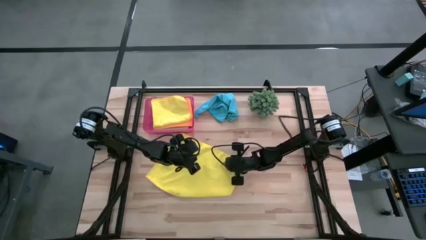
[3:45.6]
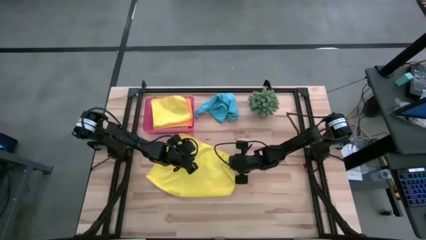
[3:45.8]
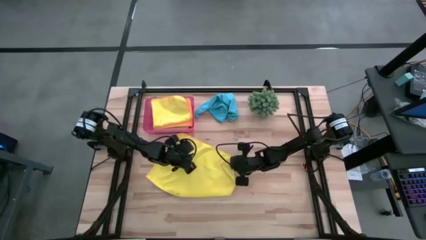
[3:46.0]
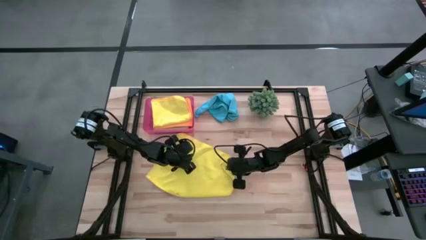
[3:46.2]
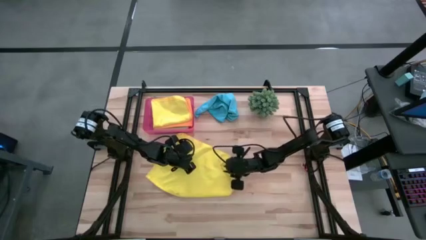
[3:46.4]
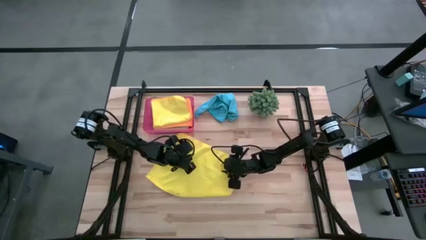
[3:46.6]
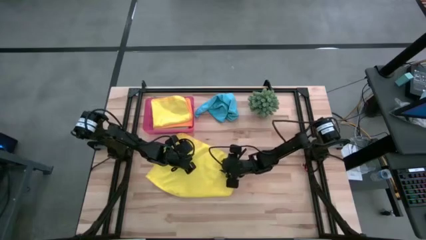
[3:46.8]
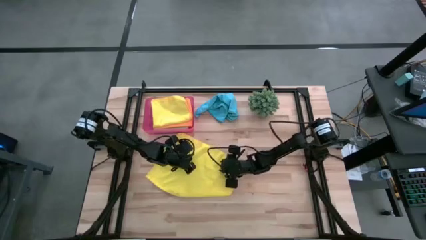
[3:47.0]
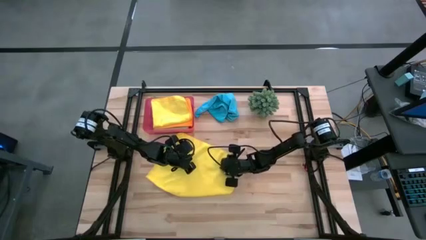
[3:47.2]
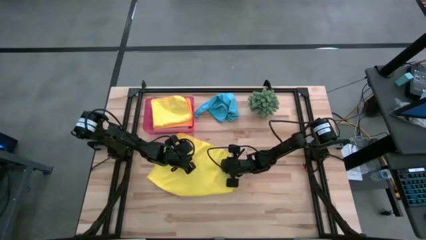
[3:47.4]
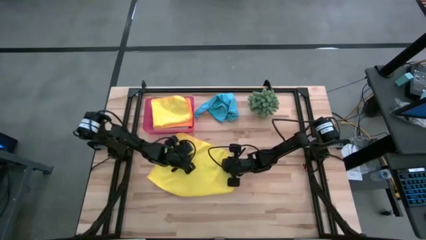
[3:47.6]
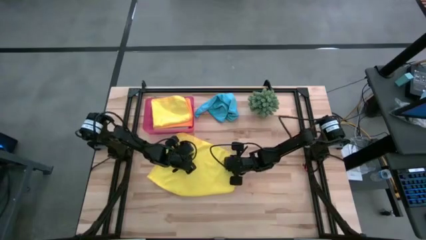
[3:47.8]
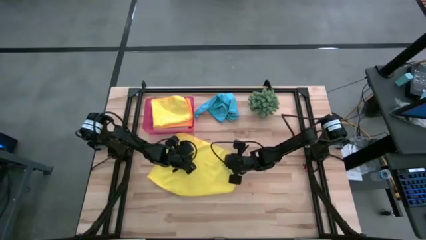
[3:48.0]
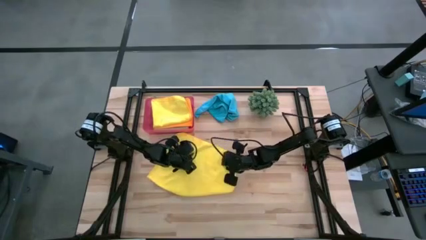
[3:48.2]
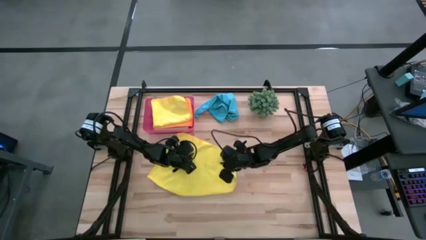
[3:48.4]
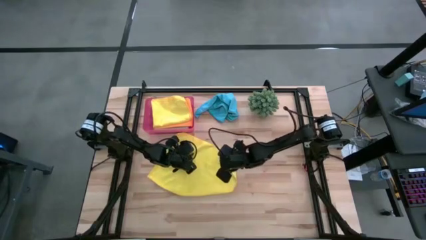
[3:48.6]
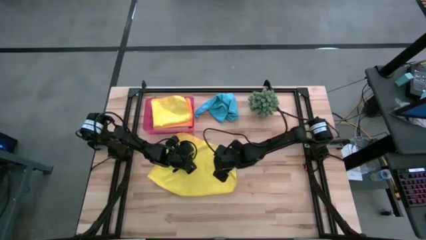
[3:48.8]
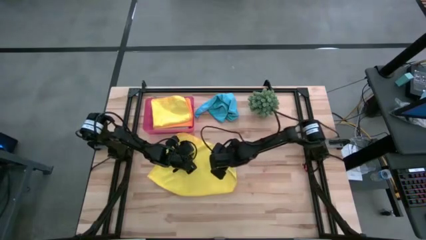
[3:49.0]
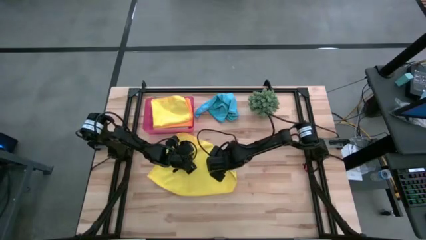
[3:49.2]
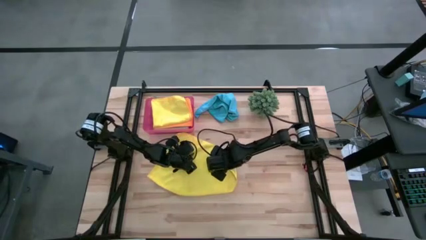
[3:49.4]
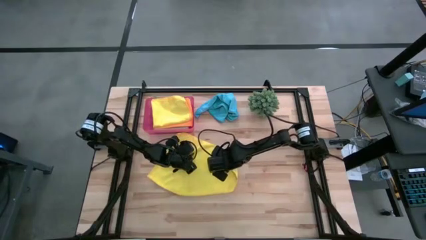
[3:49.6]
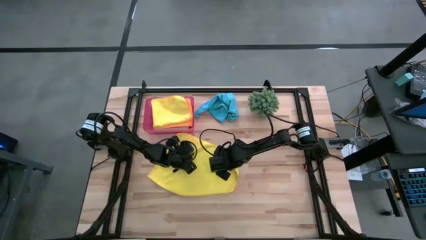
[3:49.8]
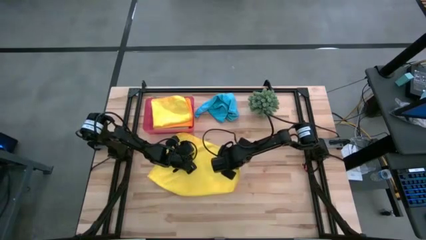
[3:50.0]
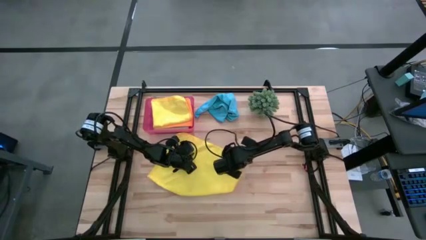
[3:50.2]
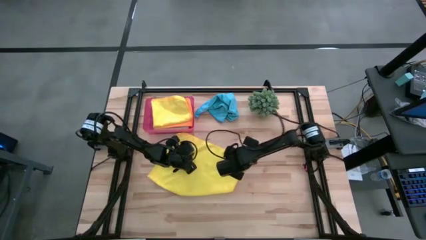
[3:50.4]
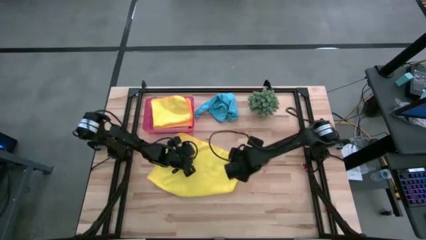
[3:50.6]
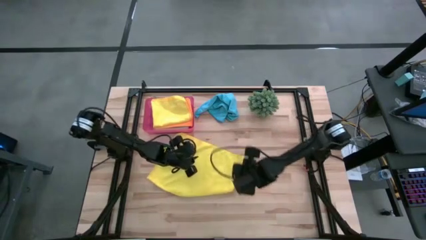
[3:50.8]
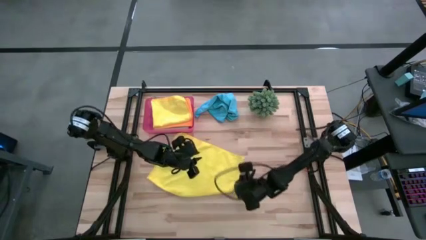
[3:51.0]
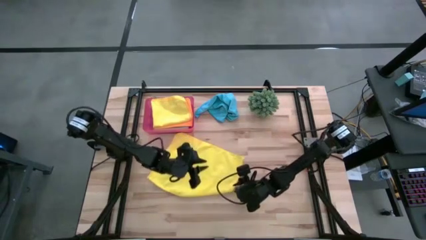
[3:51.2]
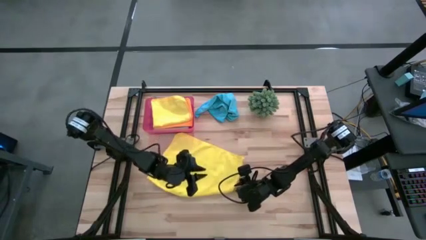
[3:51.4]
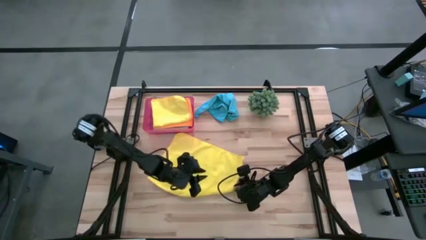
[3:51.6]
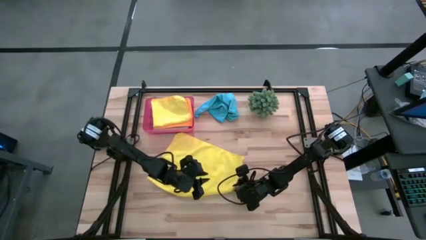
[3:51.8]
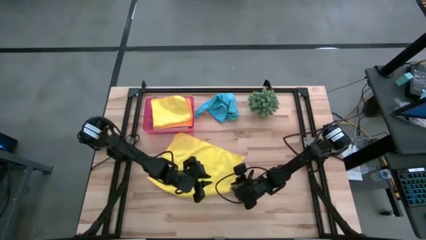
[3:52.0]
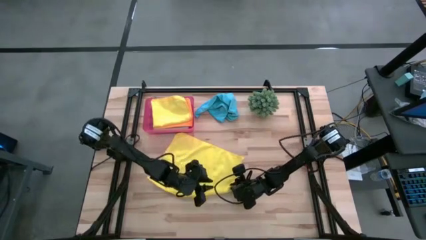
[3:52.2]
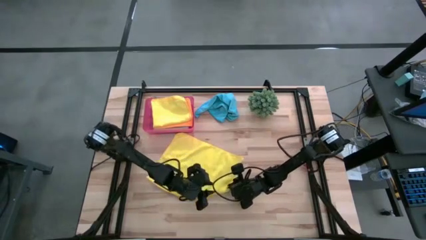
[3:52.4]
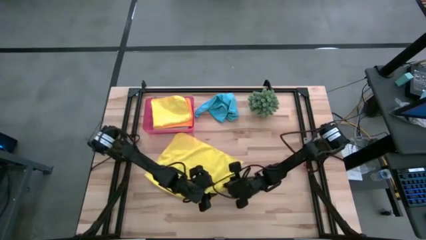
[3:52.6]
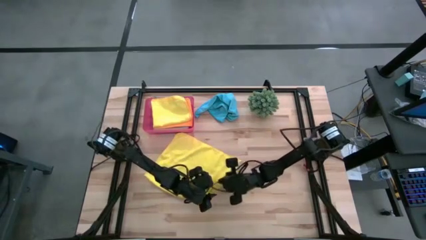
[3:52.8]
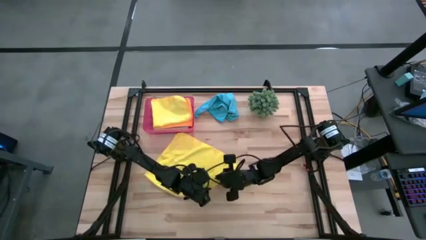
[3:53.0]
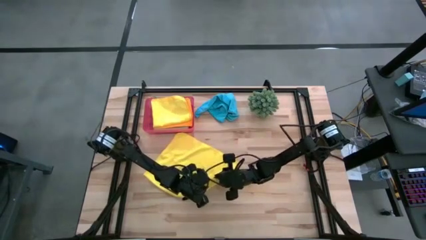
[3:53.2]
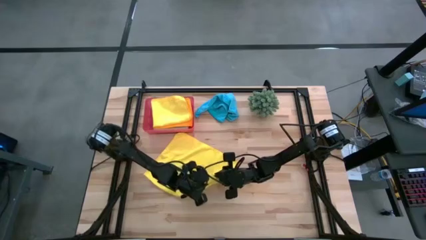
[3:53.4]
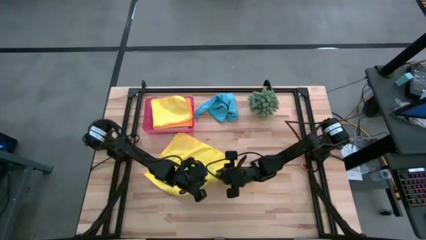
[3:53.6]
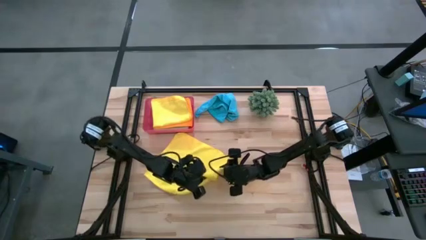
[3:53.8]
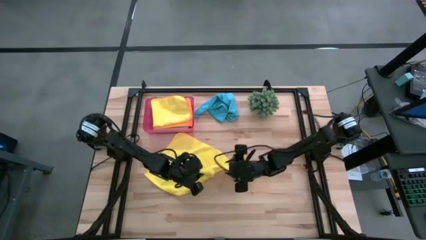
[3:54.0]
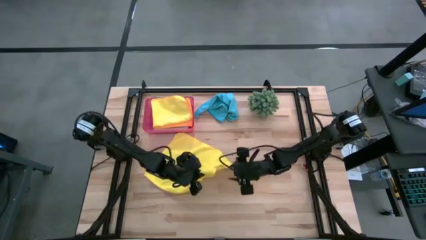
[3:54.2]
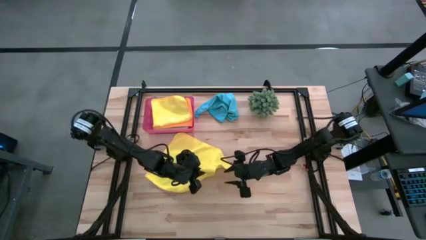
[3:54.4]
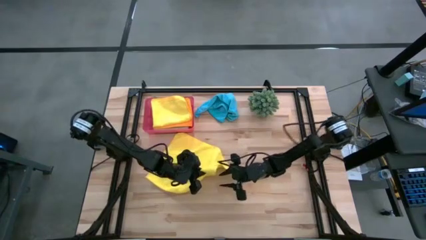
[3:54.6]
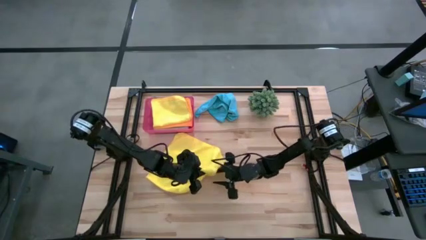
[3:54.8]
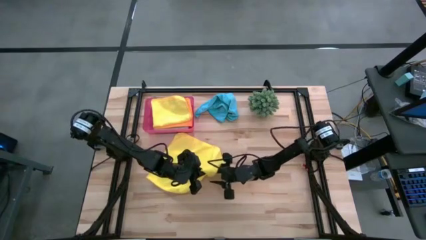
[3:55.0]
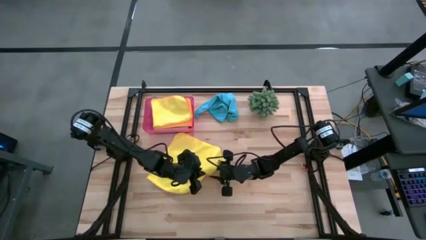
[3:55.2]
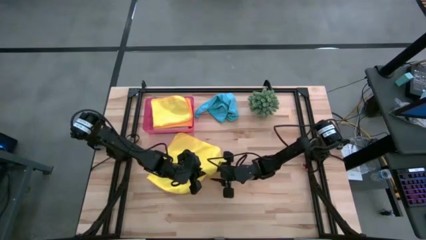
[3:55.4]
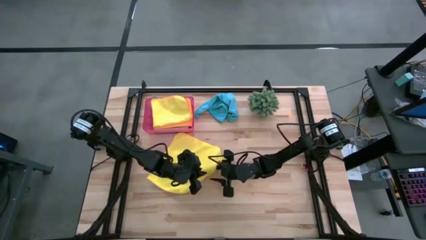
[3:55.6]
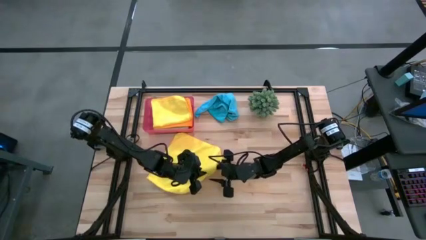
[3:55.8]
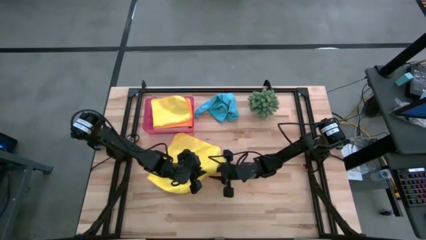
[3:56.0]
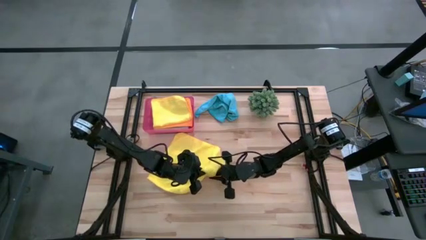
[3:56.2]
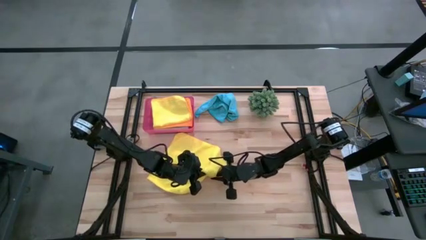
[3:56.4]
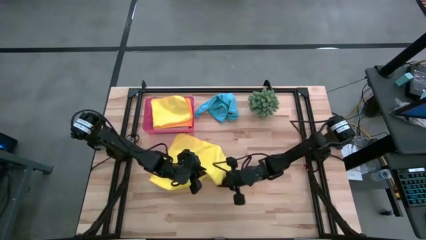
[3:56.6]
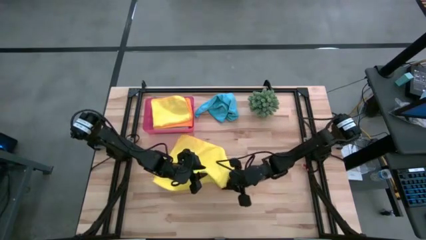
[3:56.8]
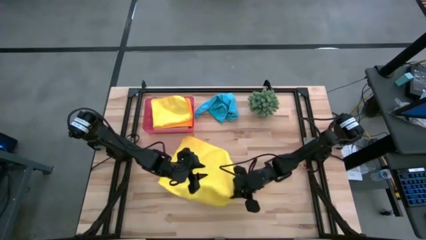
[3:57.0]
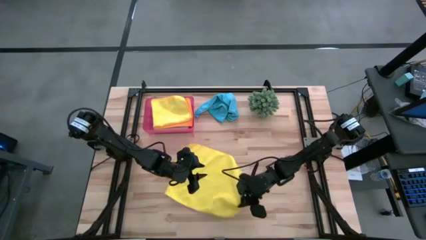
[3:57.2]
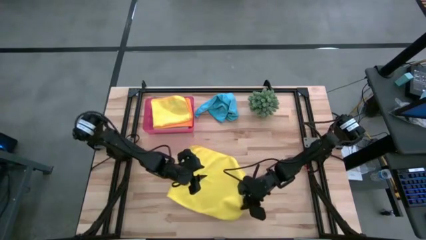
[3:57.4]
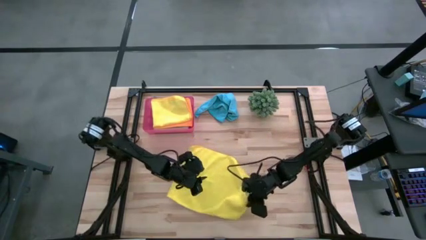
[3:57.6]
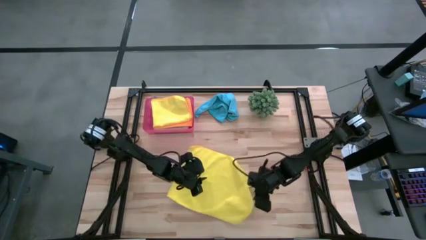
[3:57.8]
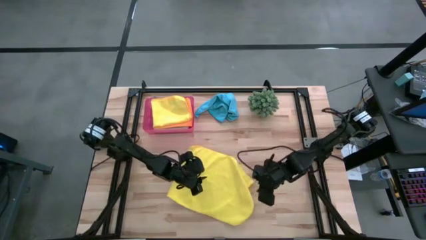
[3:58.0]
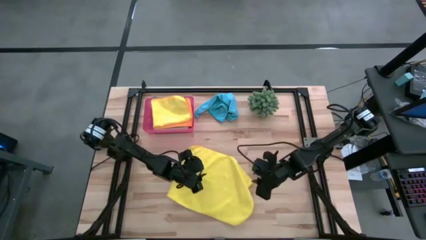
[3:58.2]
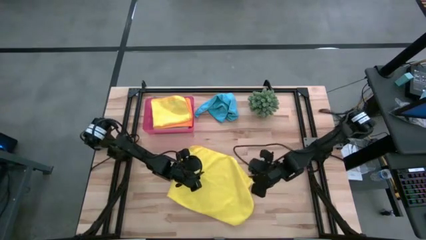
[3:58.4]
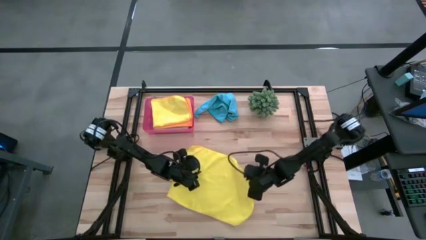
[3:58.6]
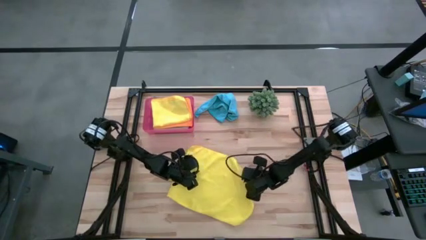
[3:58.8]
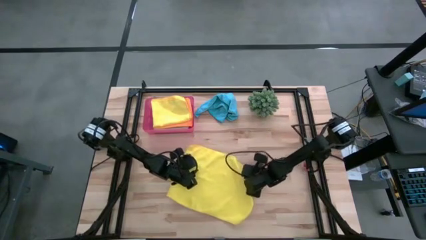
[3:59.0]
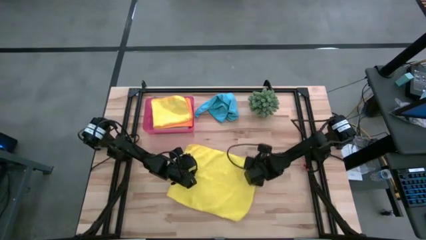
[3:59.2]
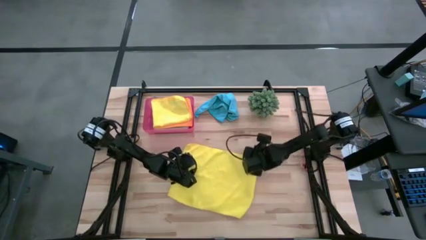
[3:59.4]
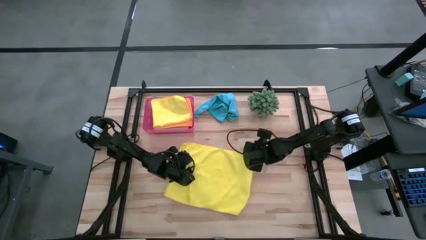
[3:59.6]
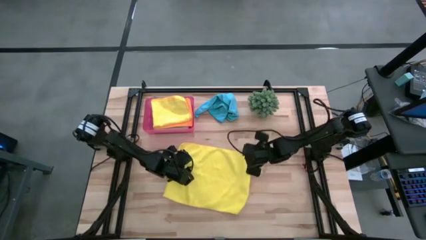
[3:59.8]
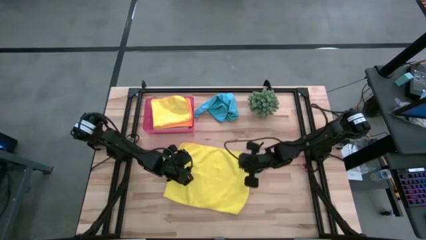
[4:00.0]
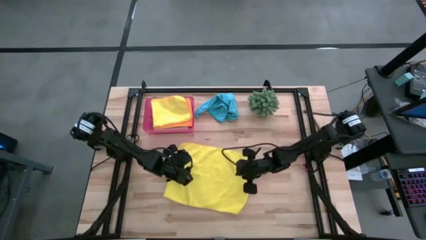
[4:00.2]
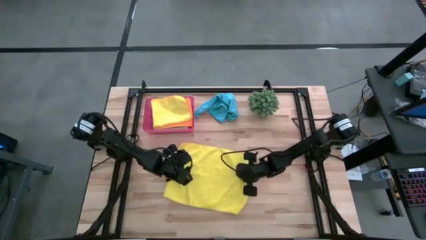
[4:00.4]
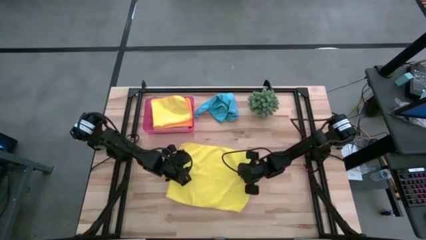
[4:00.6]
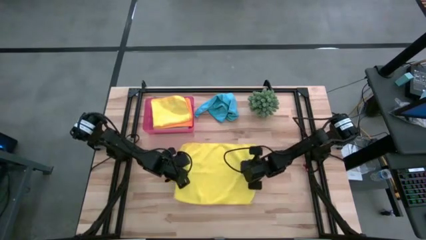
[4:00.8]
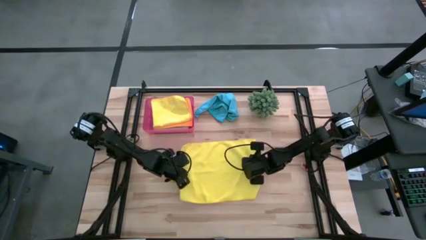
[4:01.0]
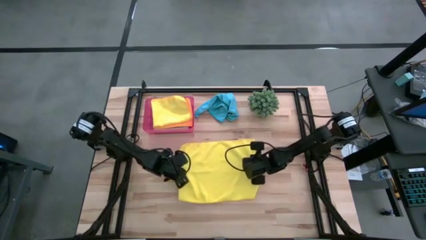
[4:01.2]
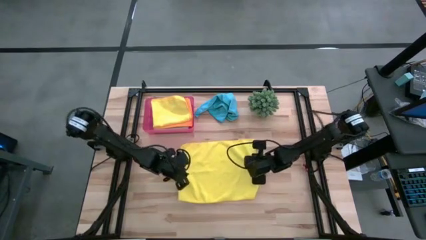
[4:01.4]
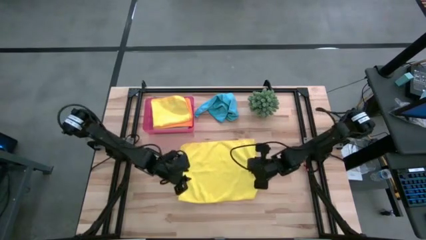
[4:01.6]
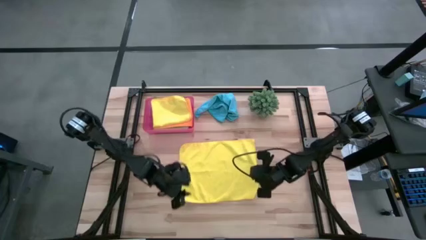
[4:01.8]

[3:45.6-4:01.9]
Task: Fold microfiber towels
Fold the yellow towel
